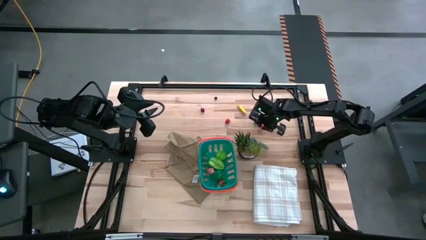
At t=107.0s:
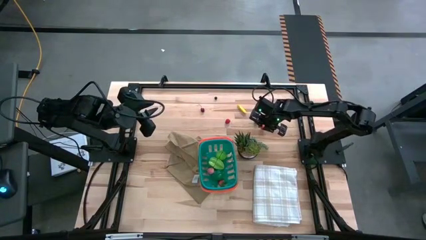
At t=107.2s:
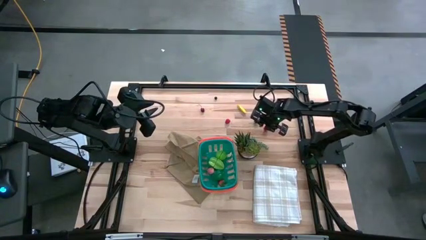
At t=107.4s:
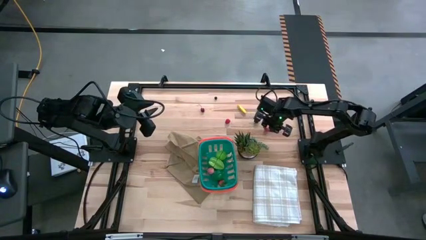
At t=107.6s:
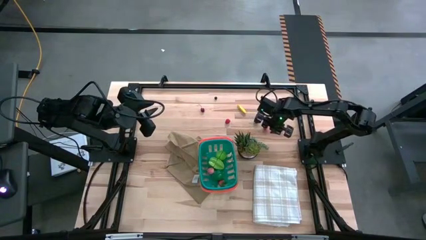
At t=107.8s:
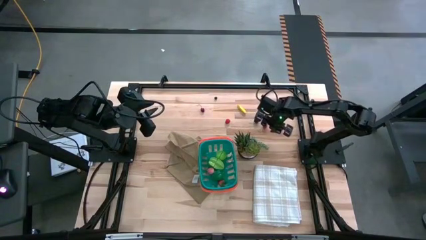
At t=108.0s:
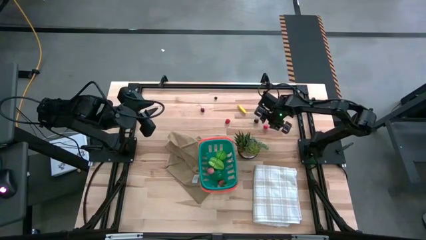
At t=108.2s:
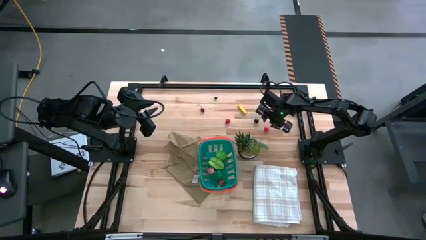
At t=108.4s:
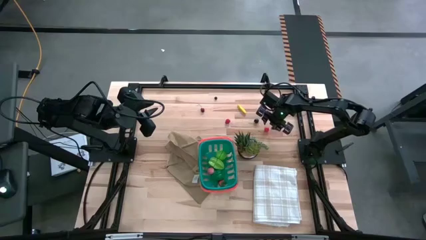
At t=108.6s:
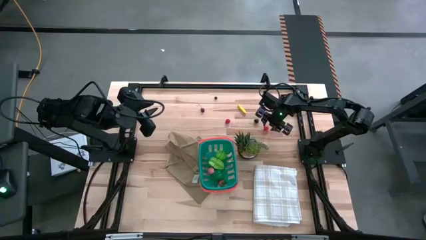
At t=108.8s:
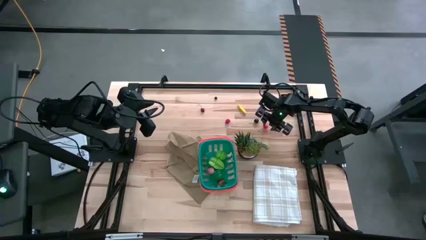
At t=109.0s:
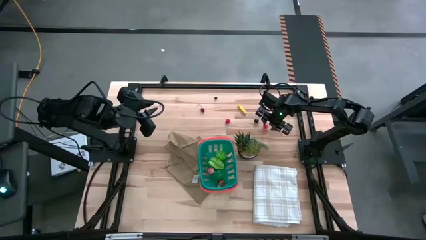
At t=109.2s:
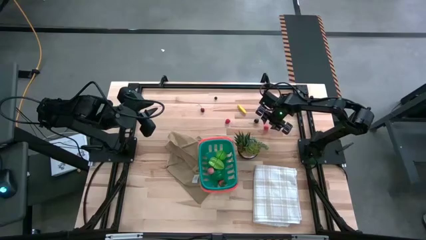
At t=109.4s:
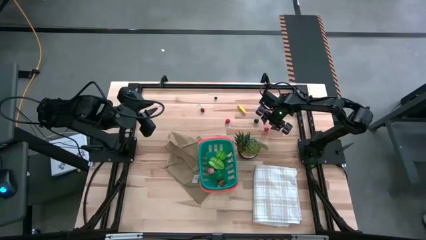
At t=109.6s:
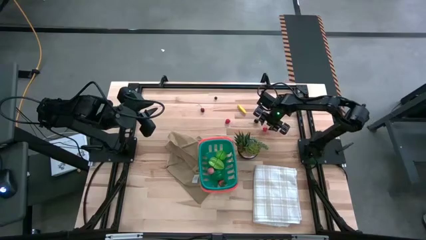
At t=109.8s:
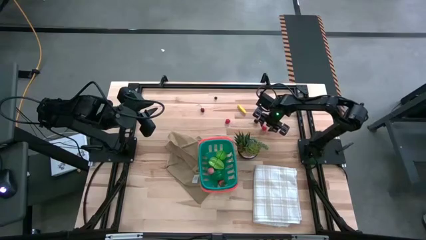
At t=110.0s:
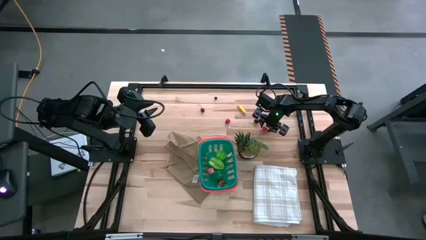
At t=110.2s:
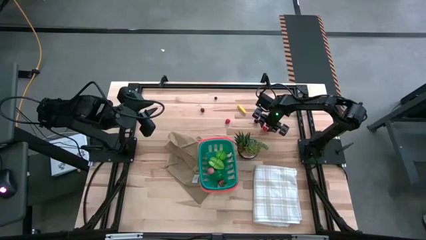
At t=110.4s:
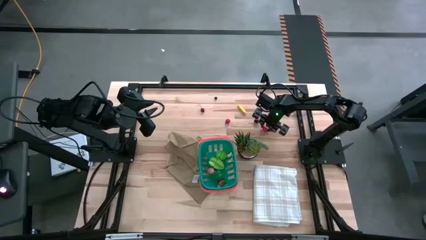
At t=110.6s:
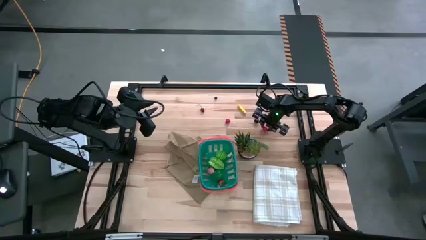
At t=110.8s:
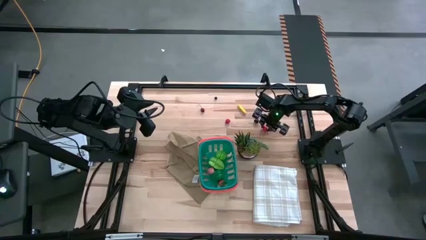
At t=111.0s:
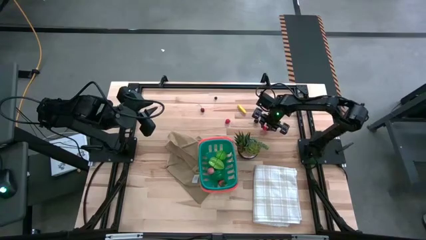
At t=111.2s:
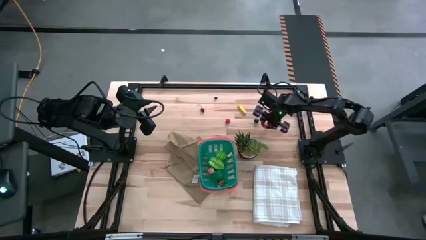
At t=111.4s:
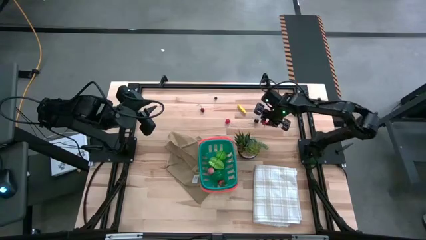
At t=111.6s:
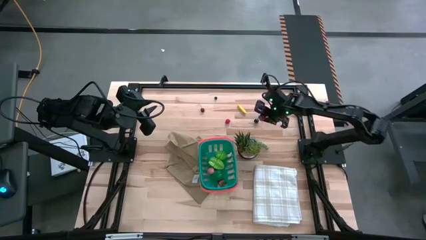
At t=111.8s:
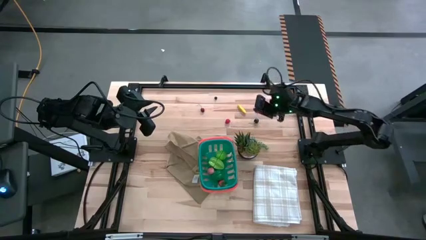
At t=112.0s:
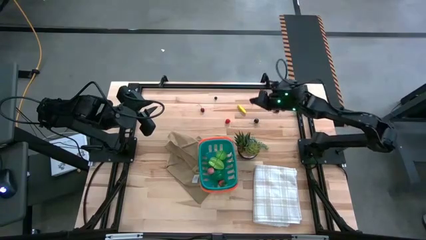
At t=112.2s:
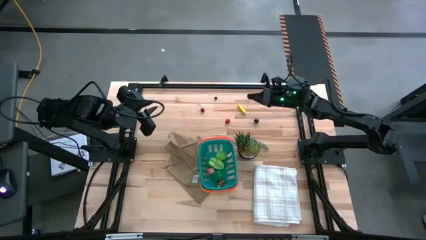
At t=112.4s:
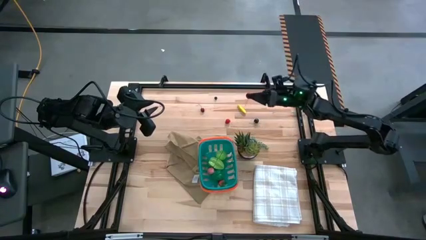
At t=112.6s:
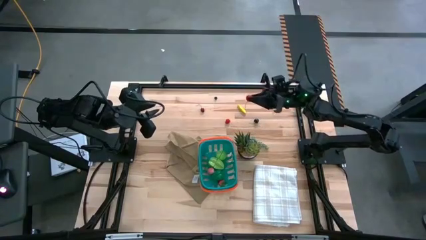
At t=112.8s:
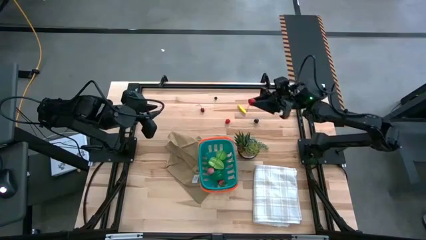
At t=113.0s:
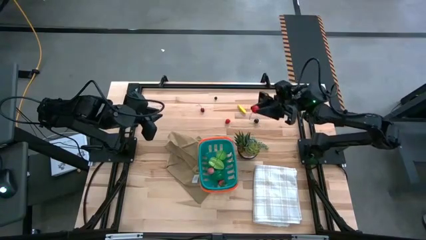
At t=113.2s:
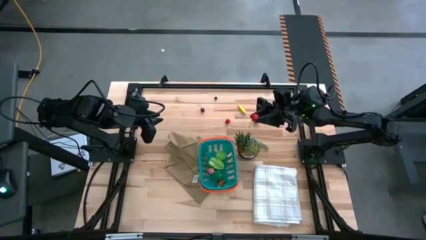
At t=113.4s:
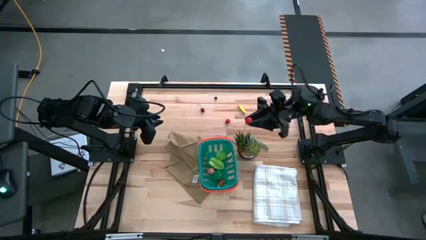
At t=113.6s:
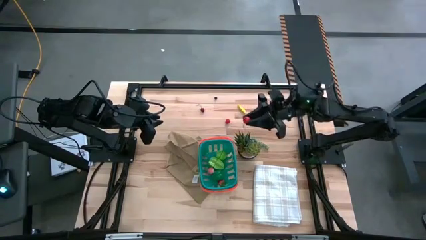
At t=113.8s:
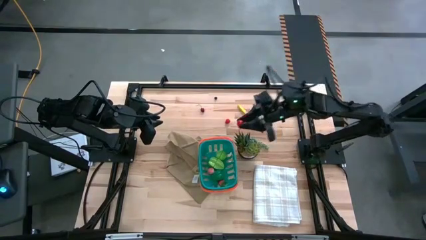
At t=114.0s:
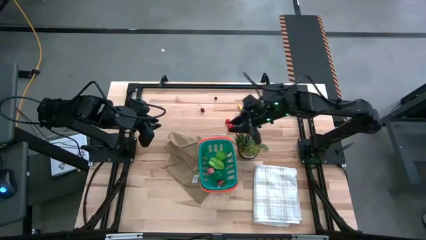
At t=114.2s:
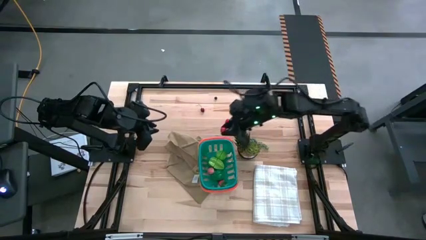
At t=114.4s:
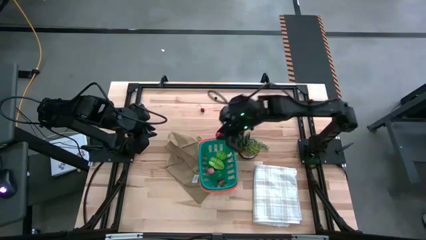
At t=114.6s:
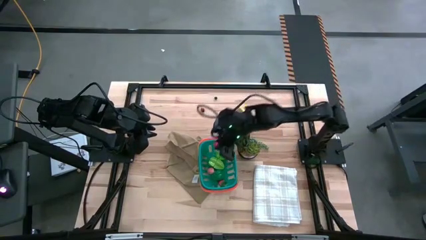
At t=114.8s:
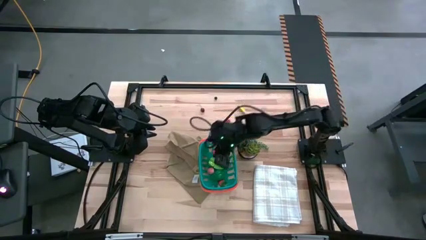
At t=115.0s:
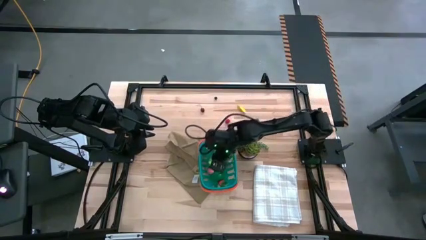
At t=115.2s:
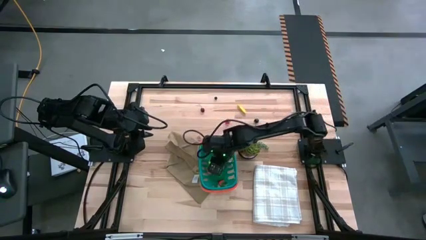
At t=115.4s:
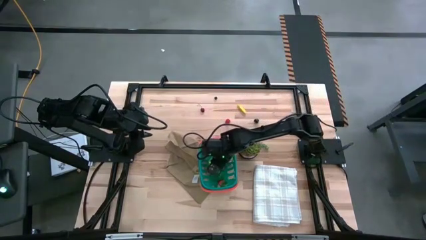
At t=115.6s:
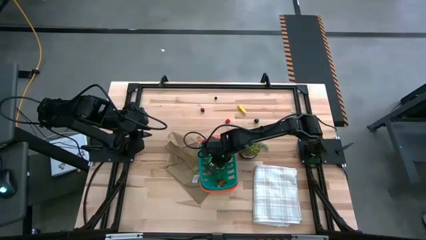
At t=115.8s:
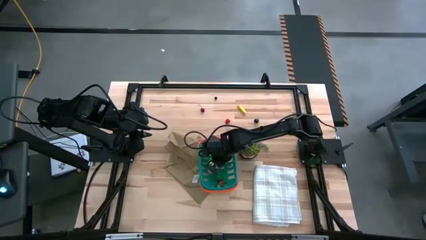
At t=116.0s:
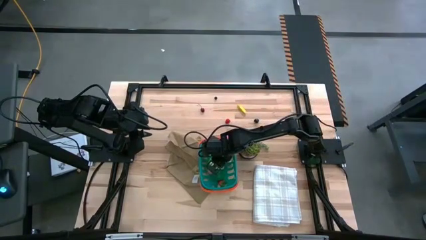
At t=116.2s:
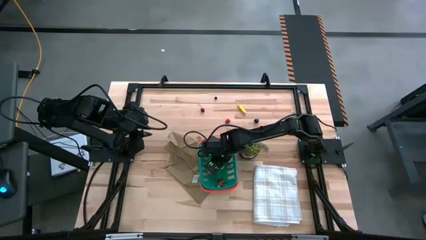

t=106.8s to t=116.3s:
Task: Pick and placing Produce into tupperware
Put the right red cherry into the green basket
